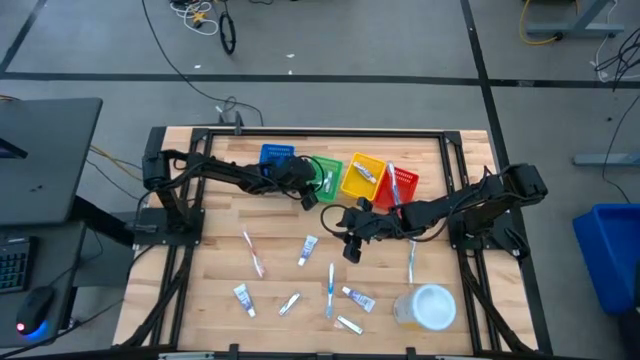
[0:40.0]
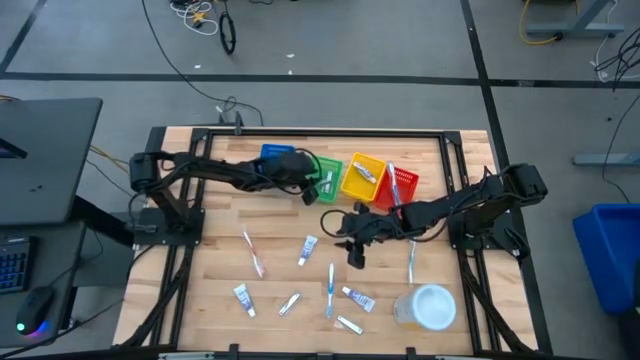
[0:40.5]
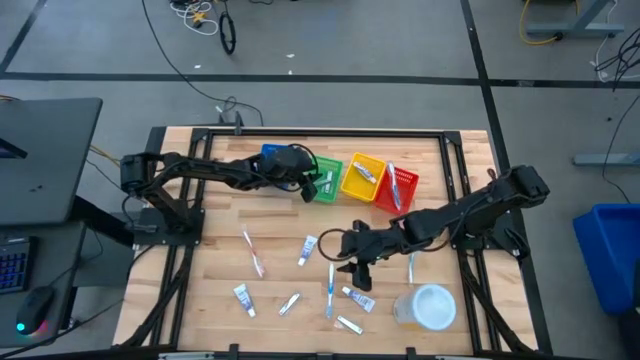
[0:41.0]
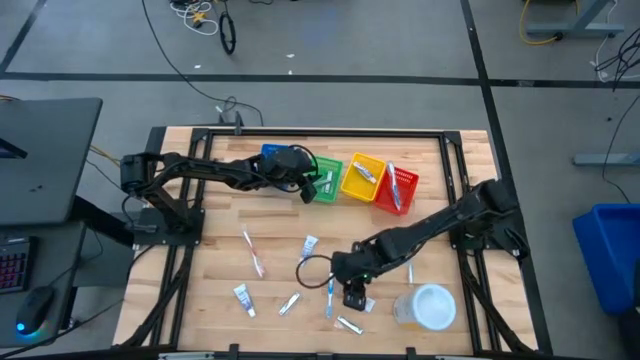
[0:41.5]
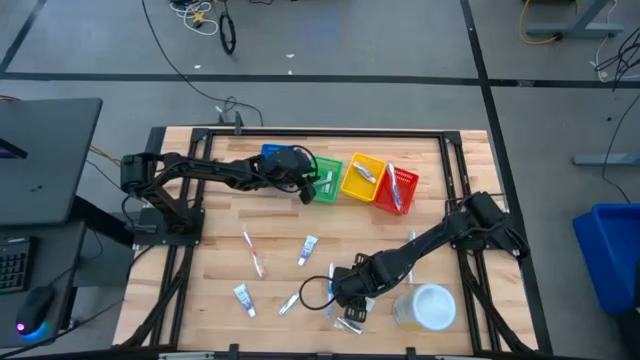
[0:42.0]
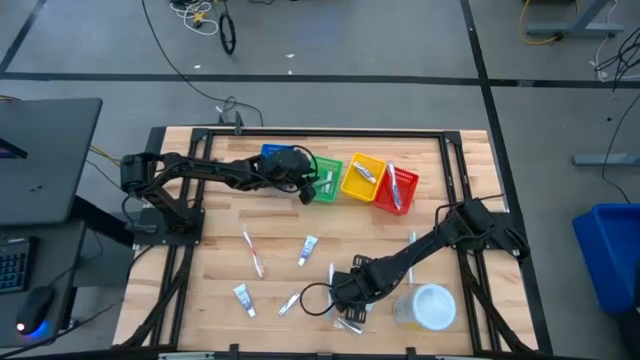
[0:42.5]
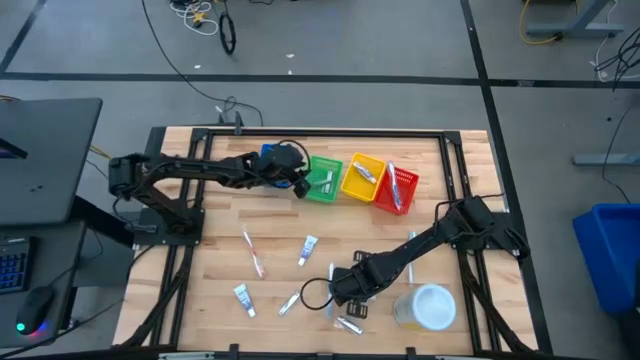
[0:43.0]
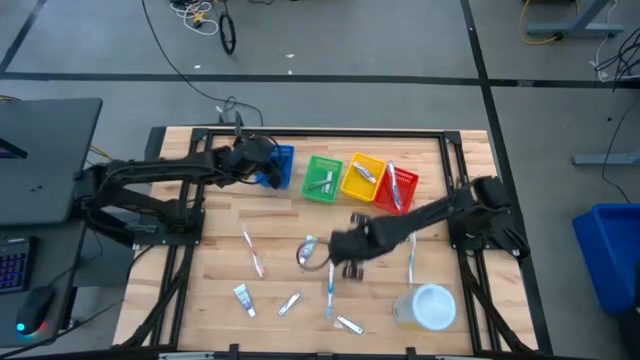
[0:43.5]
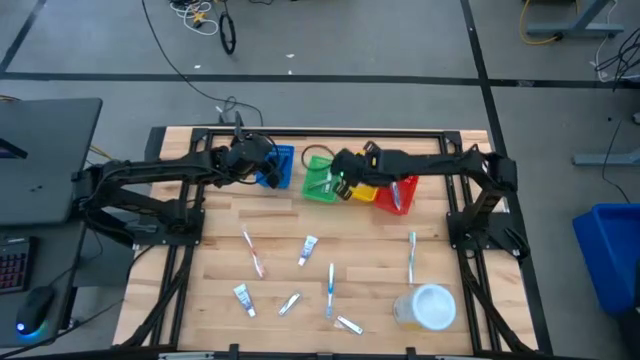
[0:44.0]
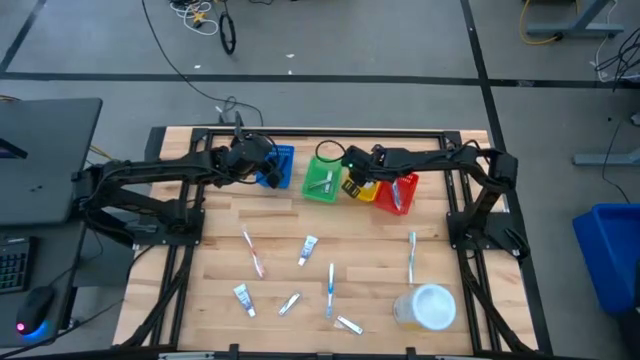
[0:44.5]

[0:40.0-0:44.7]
Task: Pick & Place Travel size toiletries
Put the right white toothpaste into the yellow bin

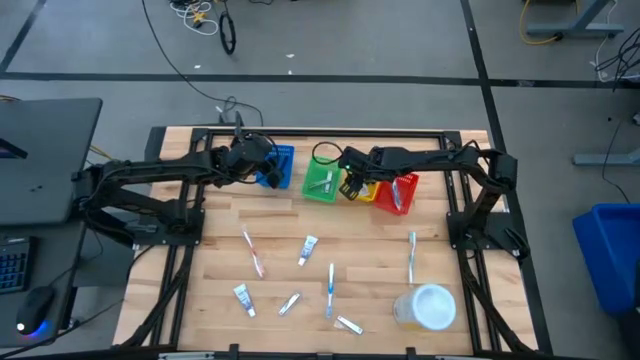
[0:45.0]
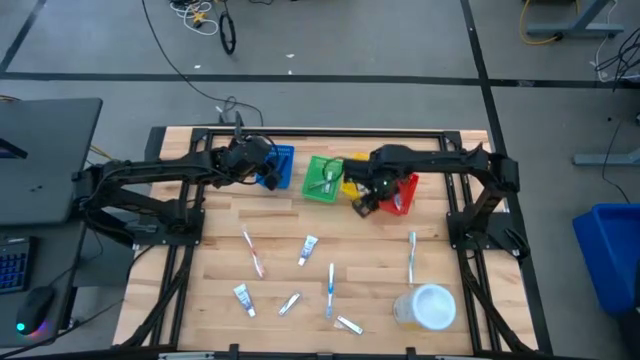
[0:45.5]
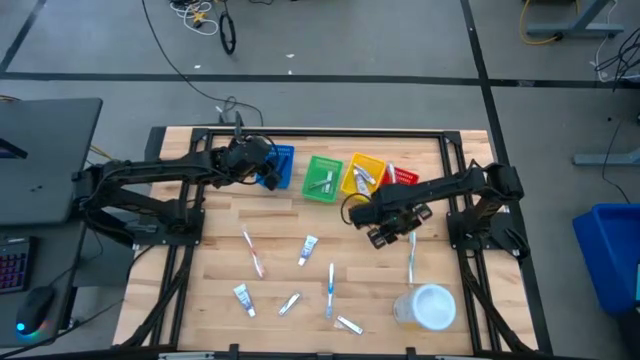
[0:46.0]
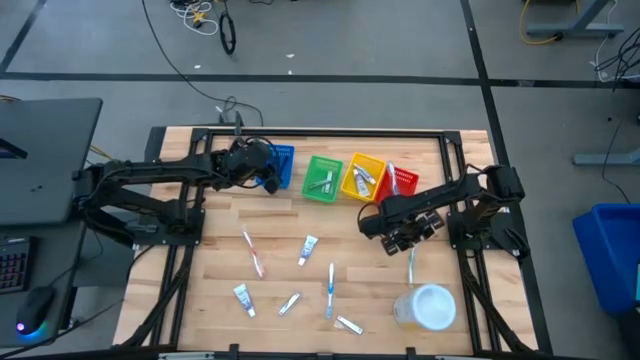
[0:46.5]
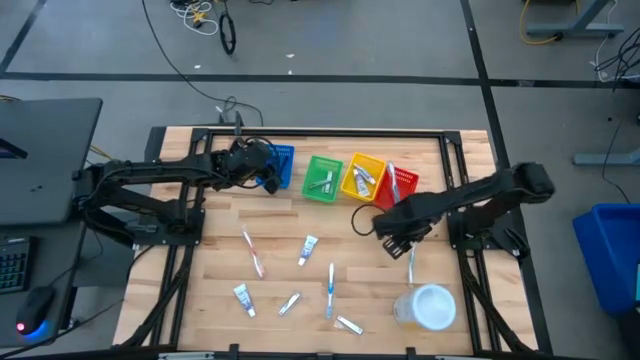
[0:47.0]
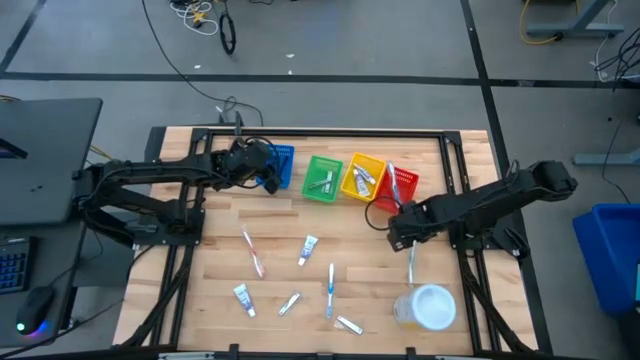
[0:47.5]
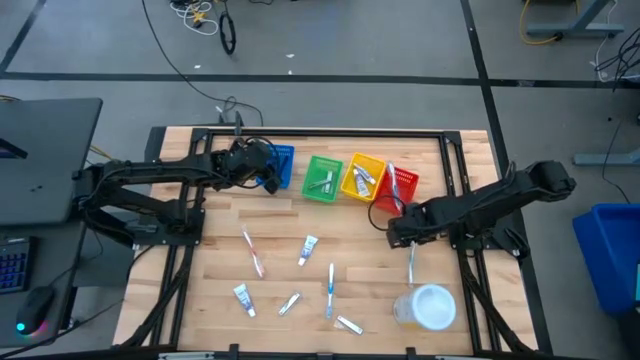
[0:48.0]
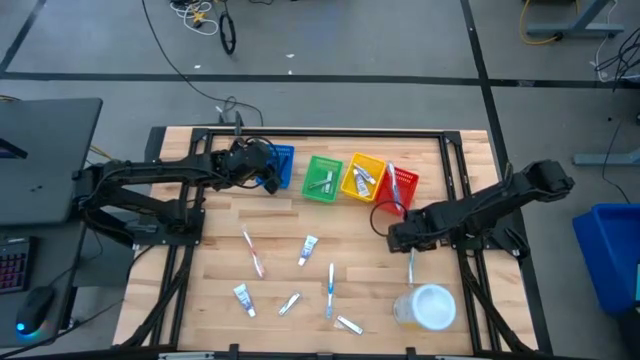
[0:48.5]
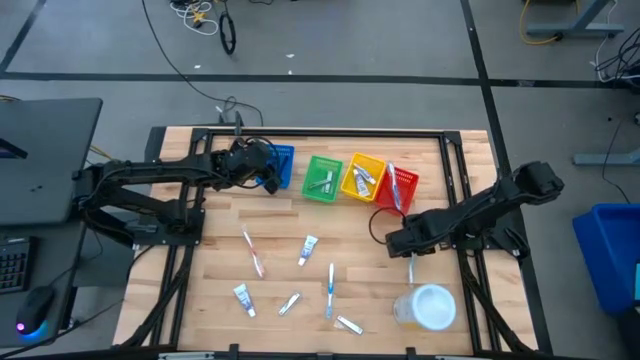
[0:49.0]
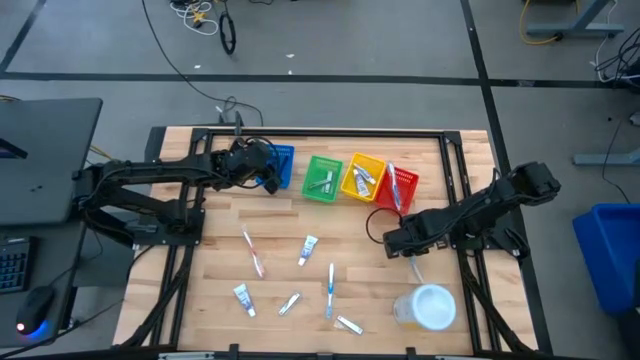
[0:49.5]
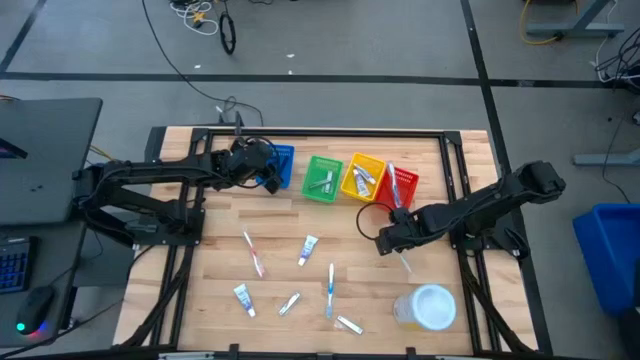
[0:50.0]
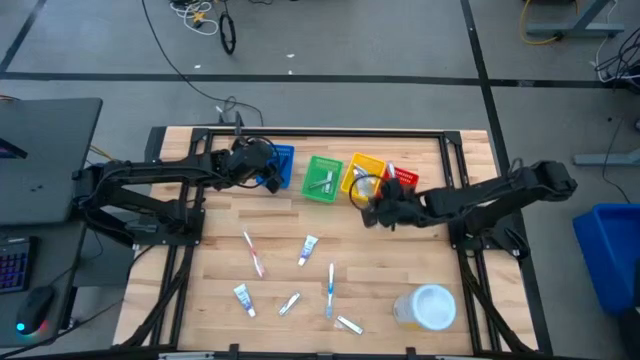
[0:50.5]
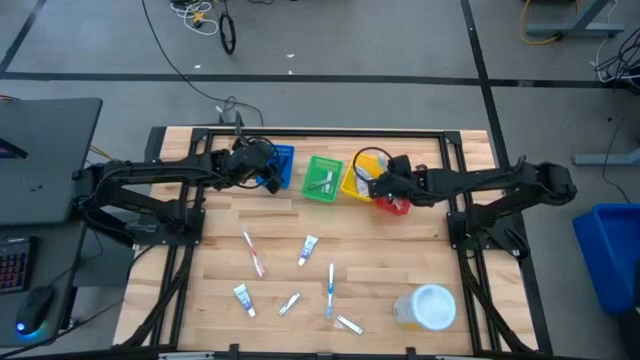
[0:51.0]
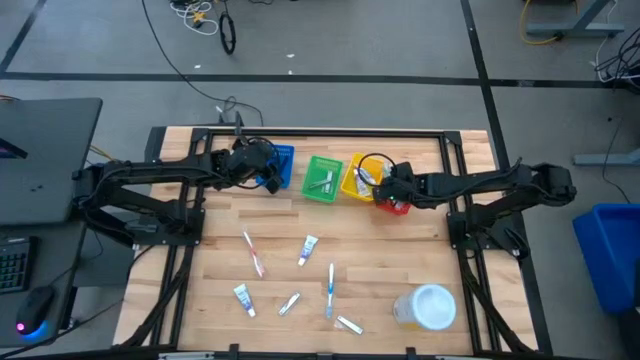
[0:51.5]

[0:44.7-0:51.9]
Put the green toothbrush into the red bin

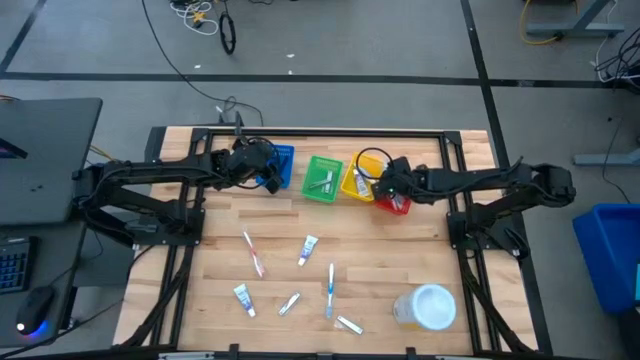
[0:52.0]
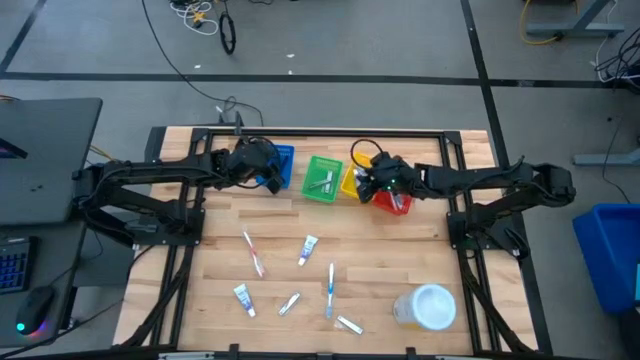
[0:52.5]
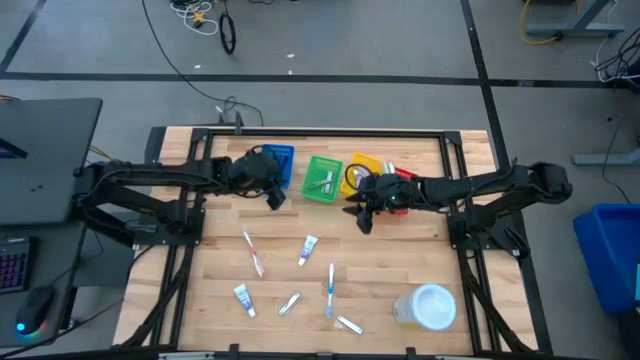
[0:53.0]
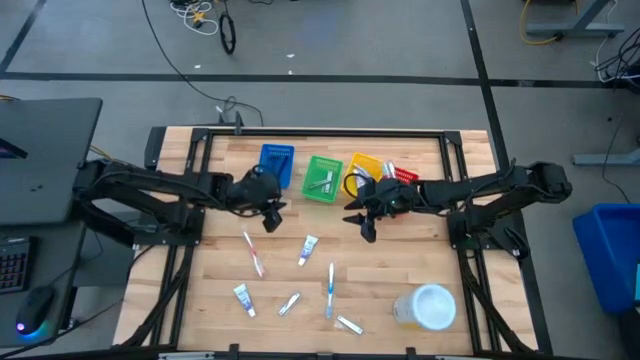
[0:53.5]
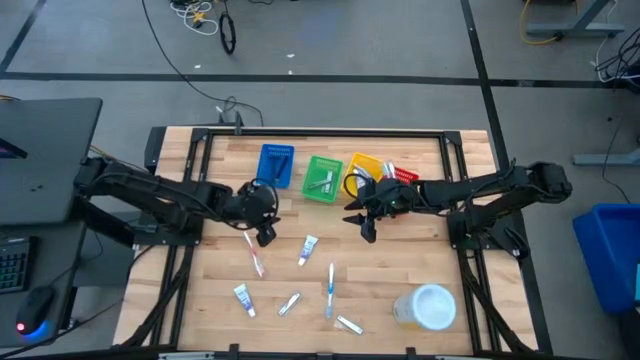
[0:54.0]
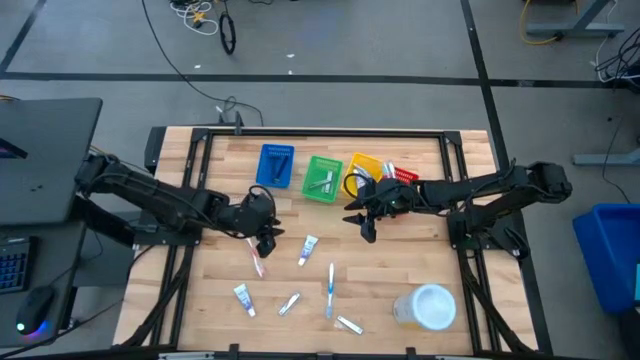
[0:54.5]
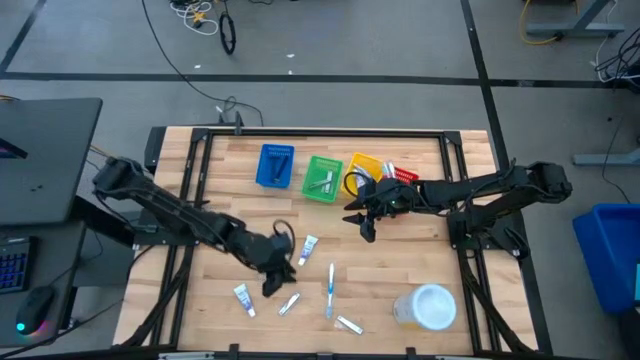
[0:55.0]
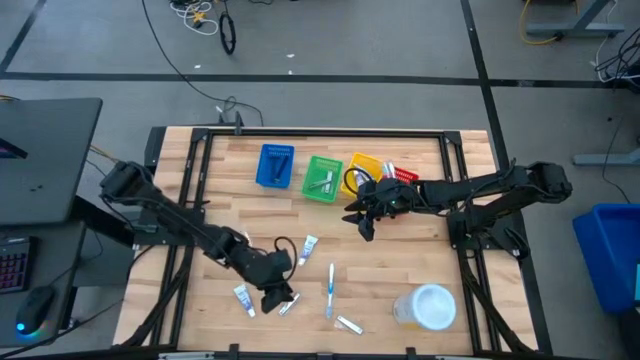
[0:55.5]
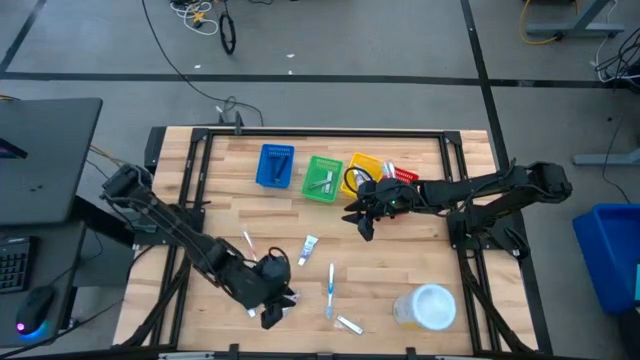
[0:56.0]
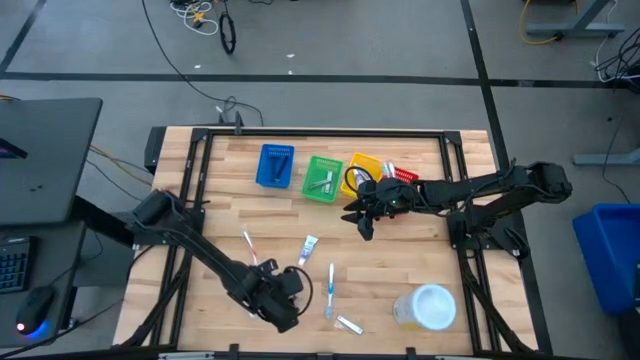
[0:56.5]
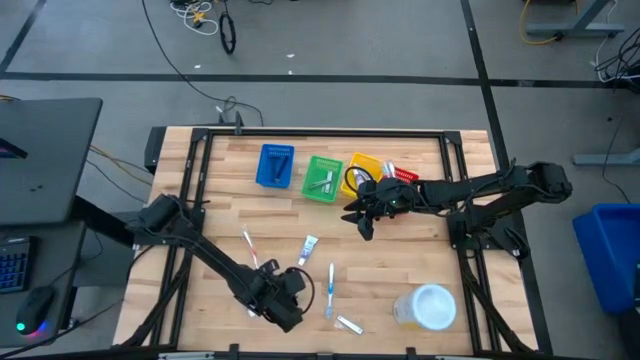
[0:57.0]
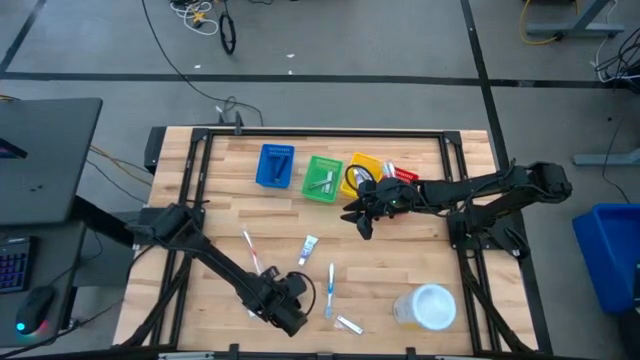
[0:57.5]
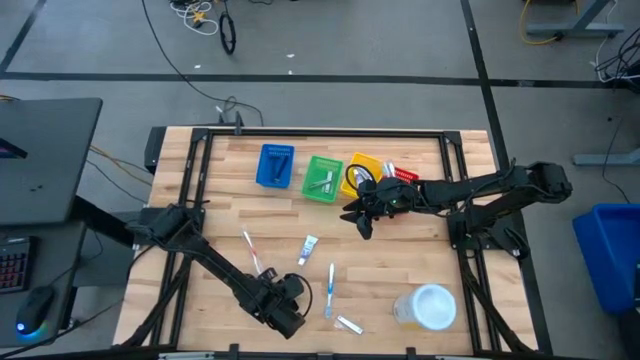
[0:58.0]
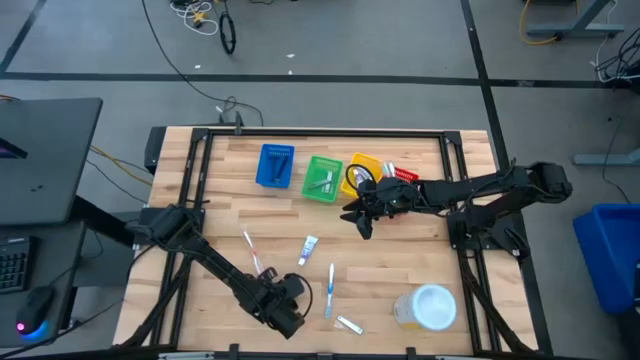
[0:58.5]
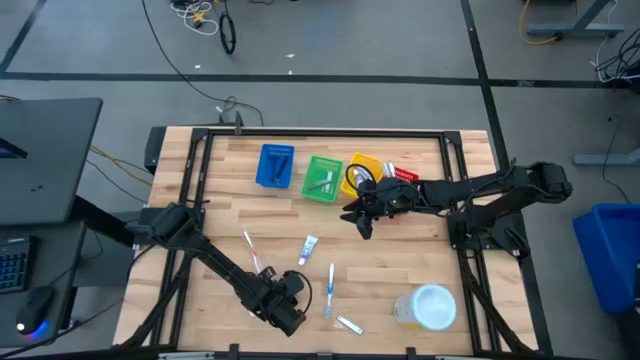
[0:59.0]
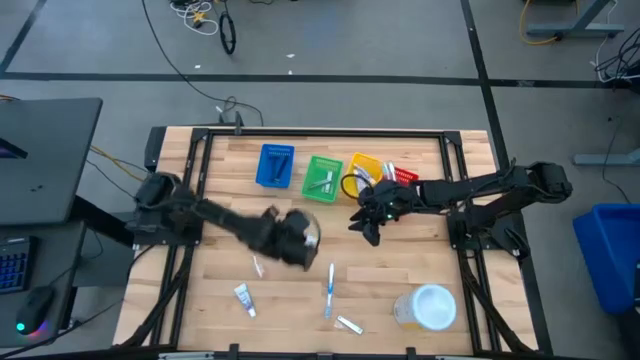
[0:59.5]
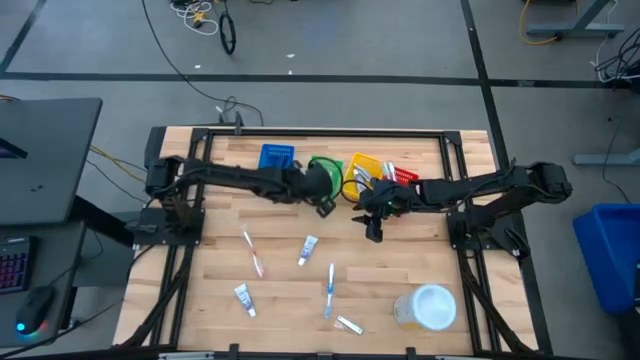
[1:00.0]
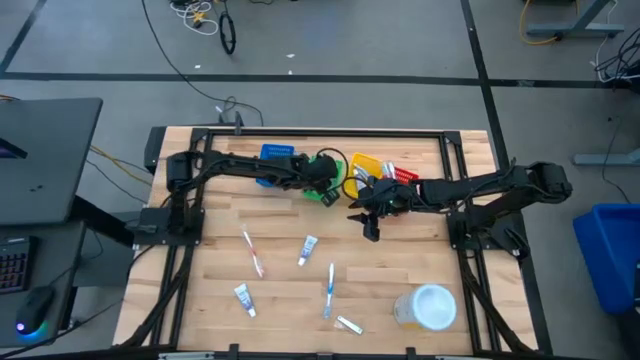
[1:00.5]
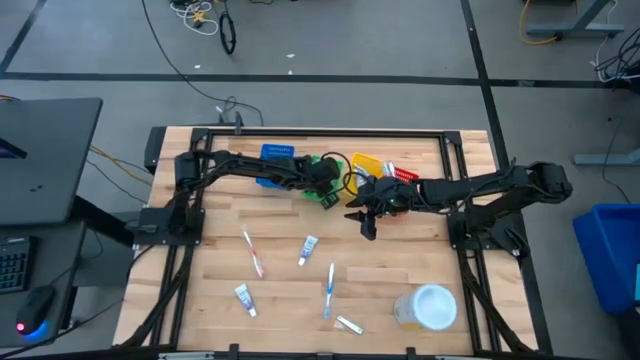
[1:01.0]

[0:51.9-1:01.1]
Put the left silver nail cutter into the green bin
